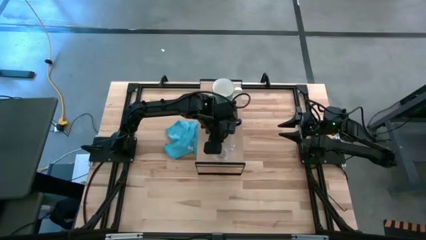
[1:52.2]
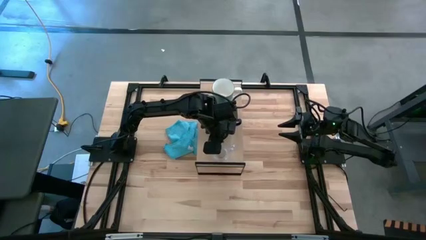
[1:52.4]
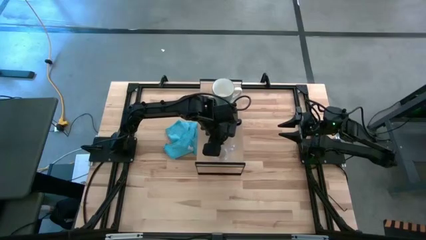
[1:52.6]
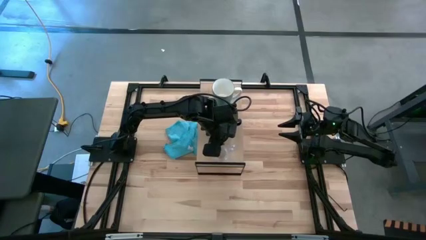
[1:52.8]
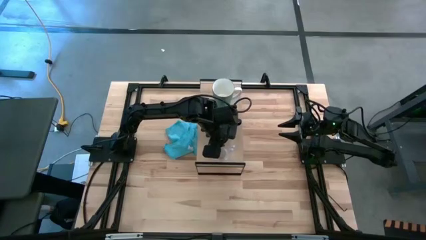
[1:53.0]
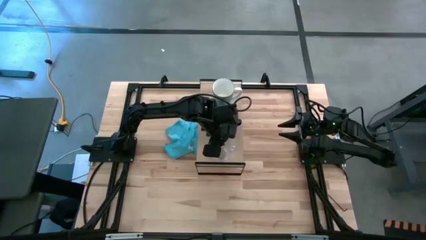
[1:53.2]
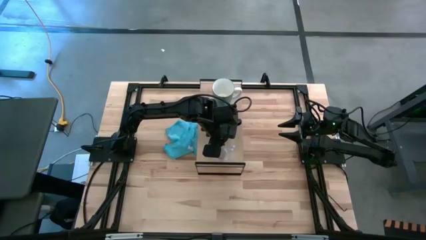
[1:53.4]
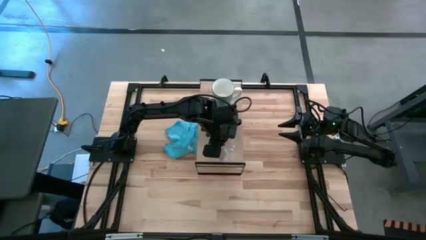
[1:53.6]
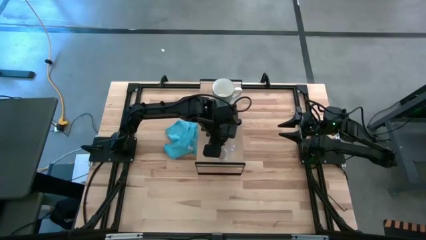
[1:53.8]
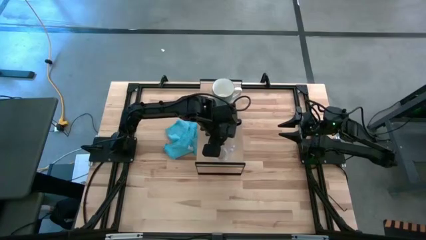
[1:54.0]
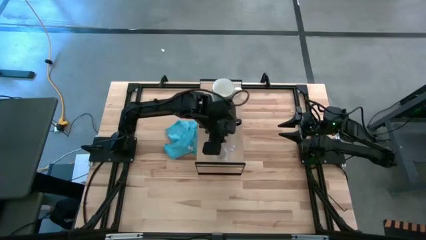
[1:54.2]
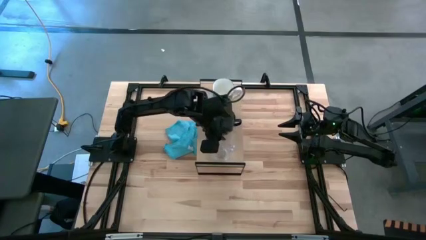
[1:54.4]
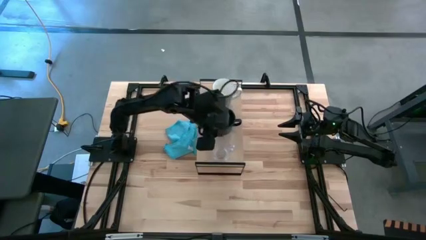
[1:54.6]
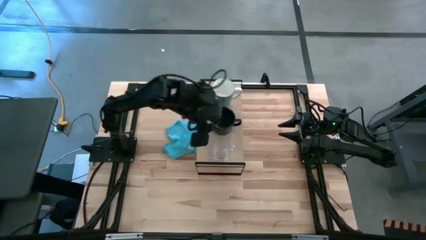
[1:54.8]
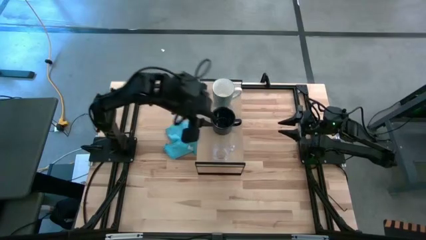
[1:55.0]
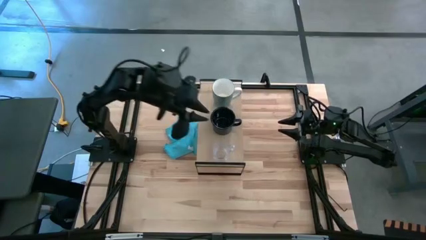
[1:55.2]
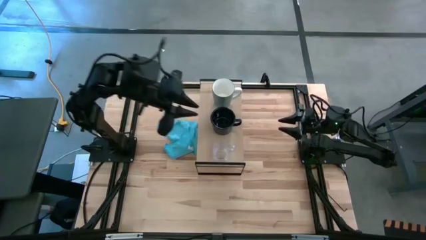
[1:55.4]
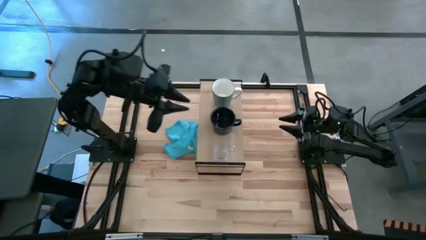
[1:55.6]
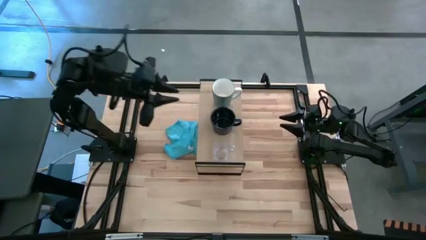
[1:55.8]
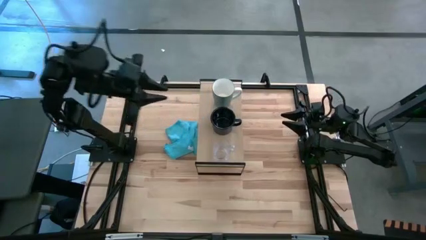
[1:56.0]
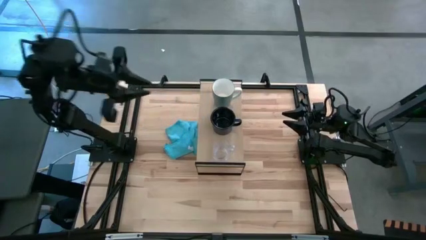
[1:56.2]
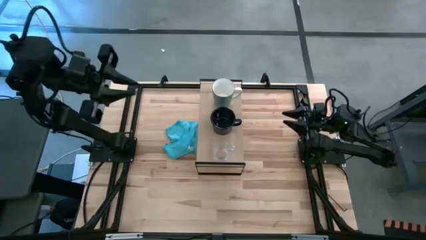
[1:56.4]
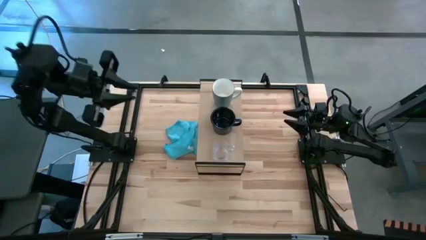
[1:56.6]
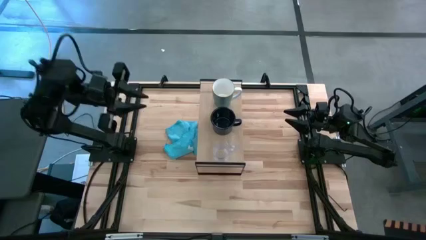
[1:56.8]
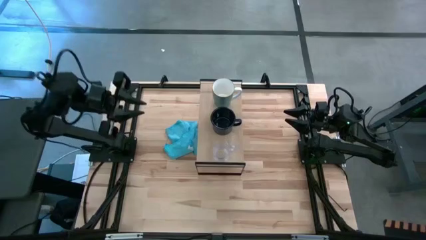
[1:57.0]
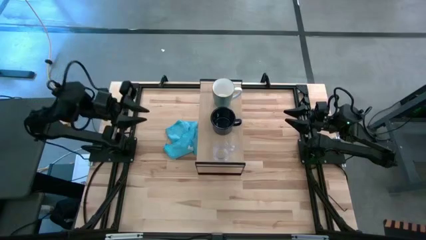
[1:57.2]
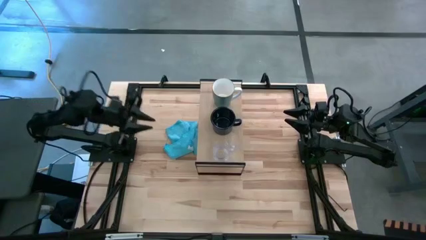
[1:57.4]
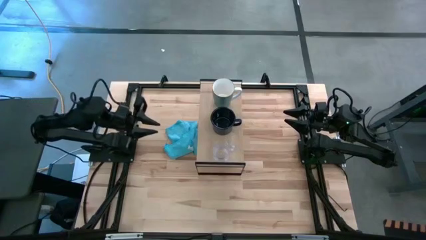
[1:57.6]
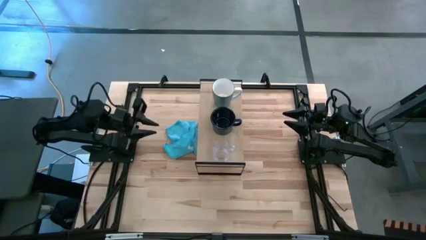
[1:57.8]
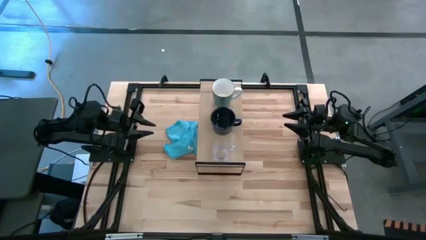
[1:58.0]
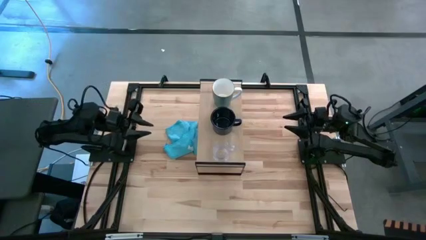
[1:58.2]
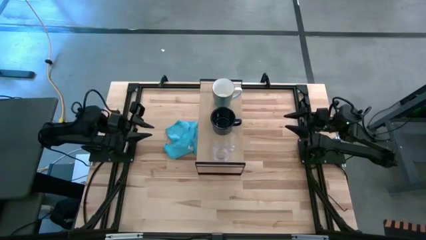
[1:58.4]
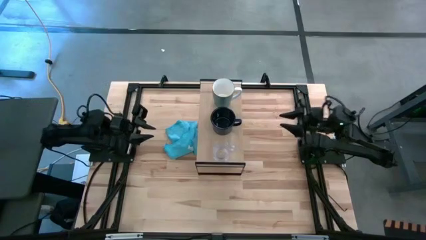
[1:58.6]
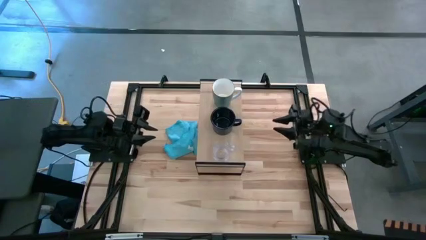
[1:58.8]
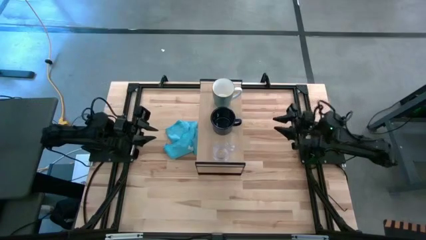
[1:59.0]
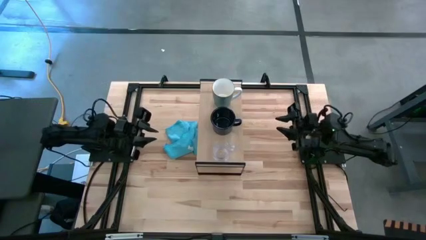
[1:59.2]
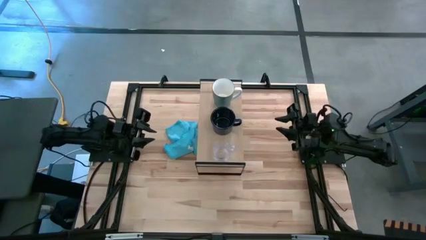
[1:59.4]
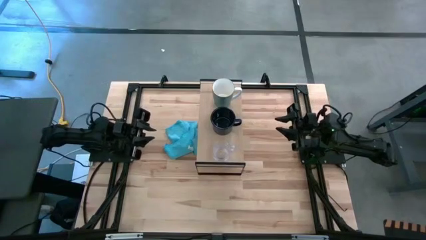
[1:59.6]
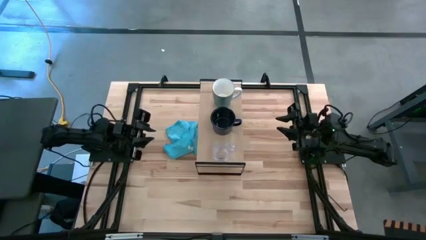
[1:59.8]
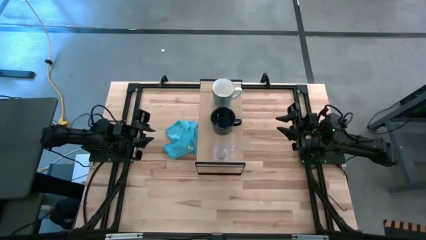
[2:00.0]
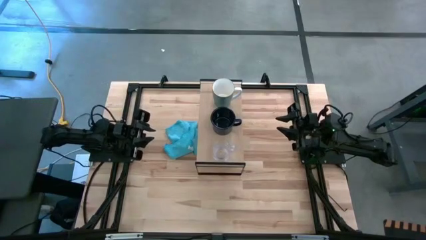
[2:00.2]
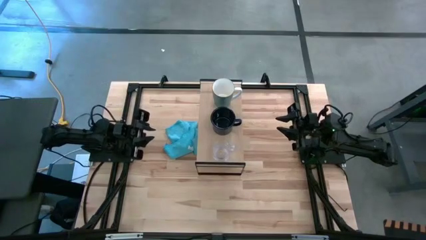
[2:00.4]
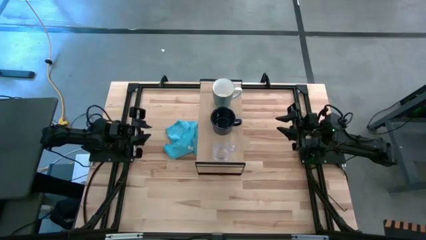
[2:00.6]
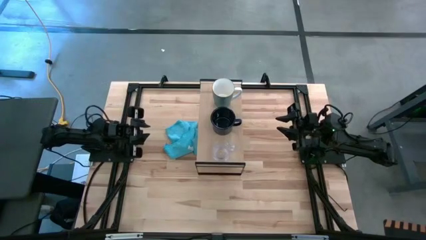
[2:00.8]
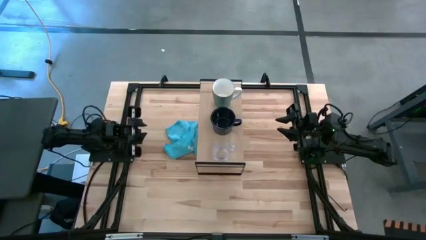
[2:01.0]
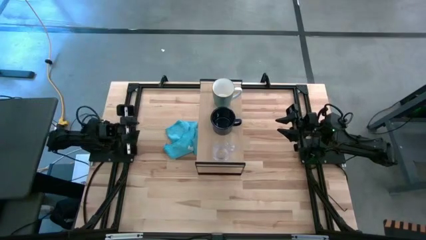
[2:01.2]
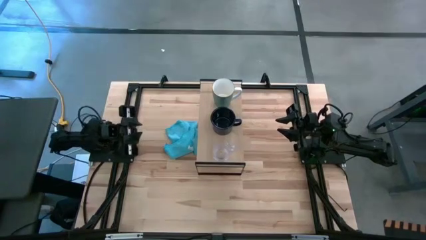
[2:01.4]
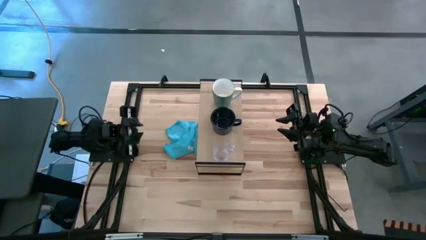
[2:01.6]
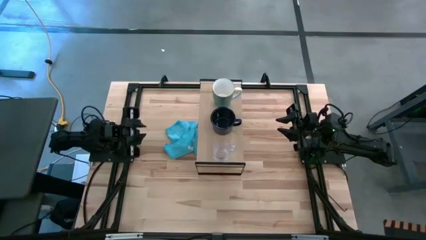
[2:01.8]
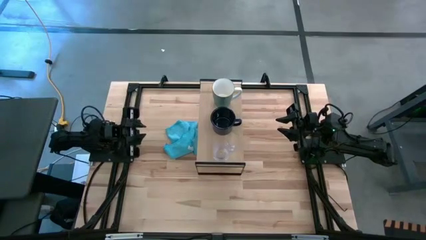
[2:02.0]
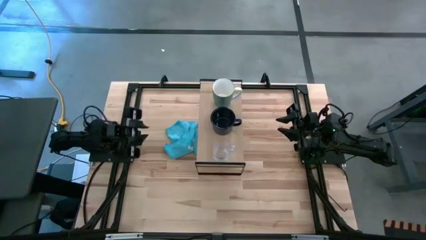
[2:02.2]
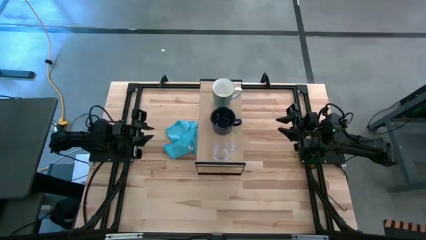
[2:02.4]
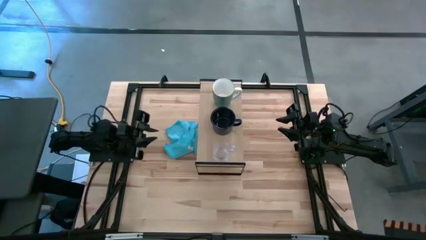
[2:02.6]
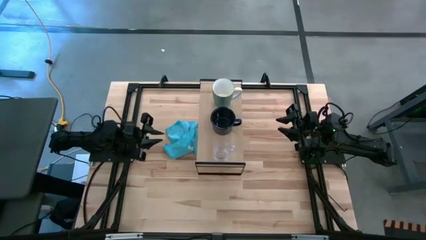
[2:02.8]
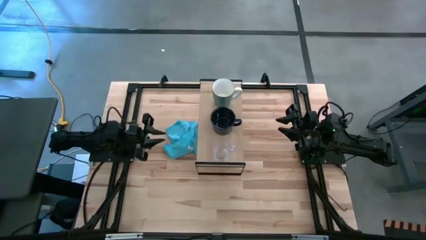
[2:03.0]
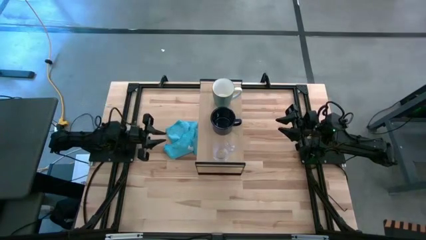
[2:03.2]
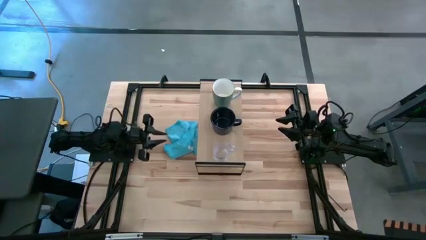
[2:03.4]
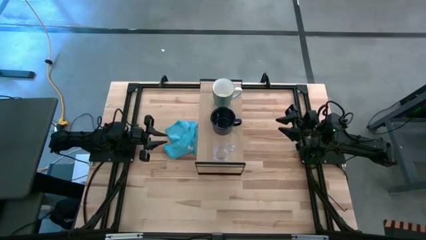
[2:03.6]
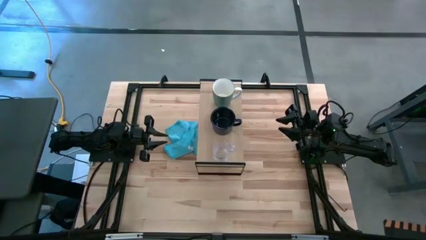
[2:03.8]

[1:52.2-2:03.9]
Task: Stack small to large cups/mugs on shelf
Return to Home Position
